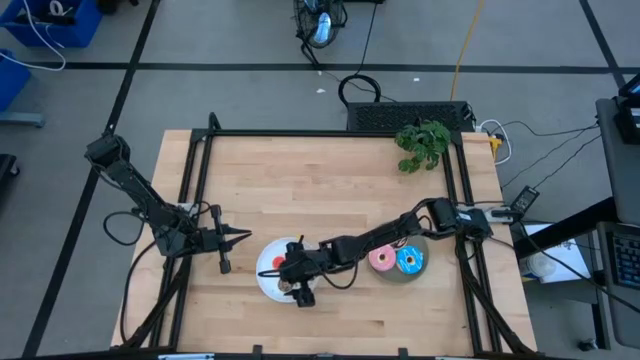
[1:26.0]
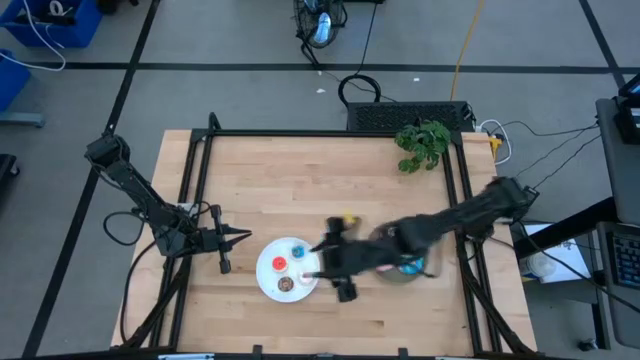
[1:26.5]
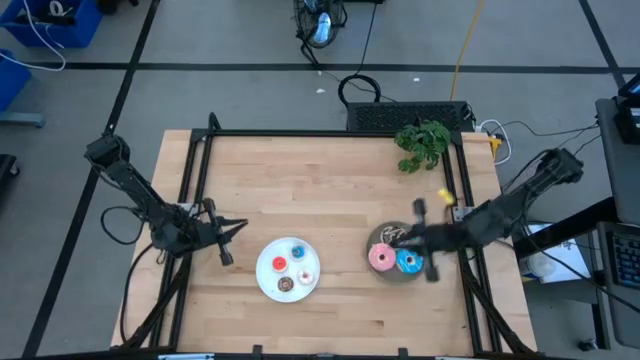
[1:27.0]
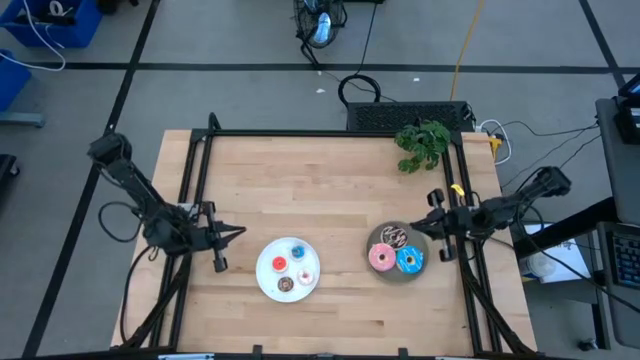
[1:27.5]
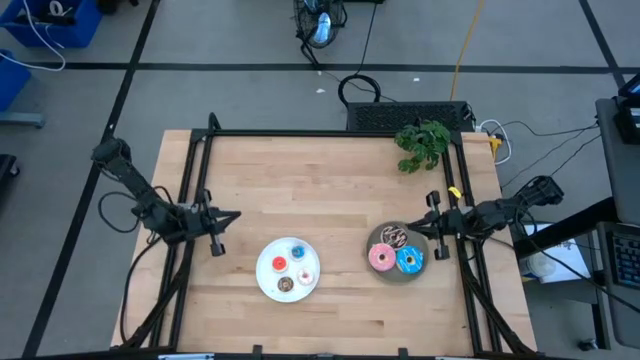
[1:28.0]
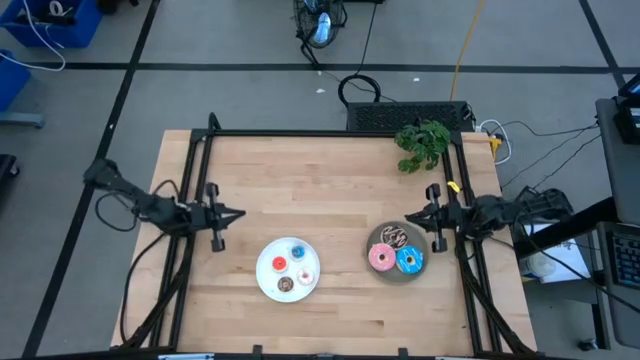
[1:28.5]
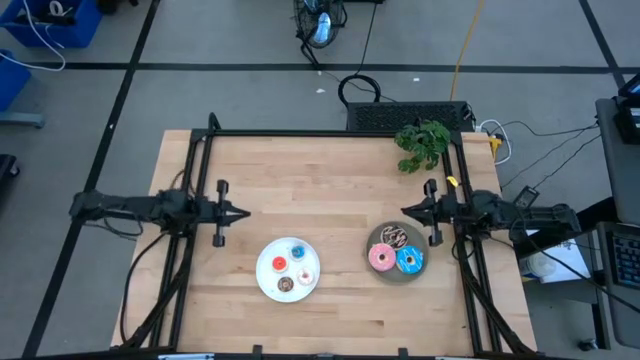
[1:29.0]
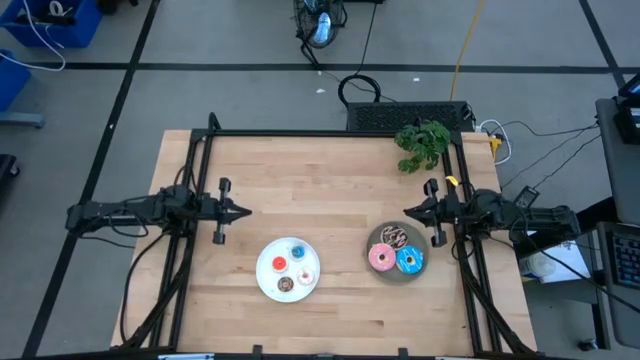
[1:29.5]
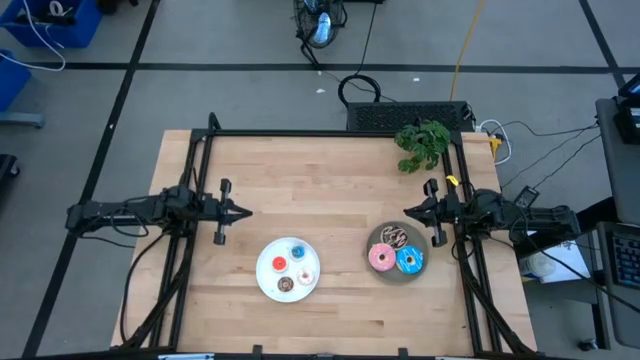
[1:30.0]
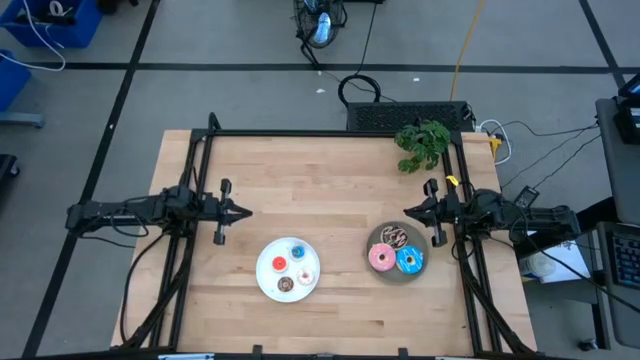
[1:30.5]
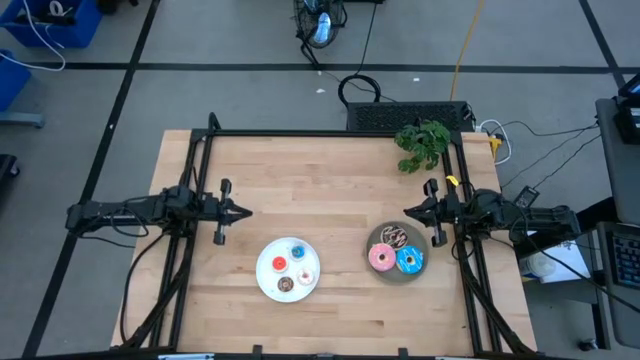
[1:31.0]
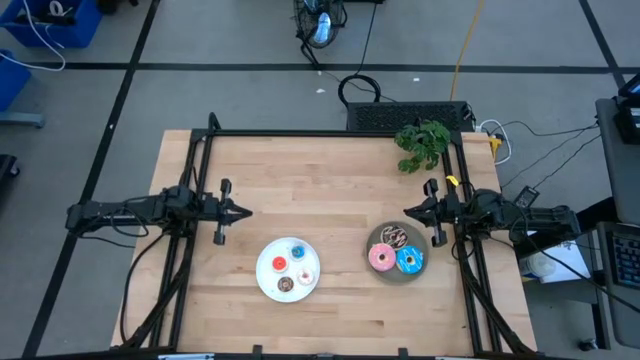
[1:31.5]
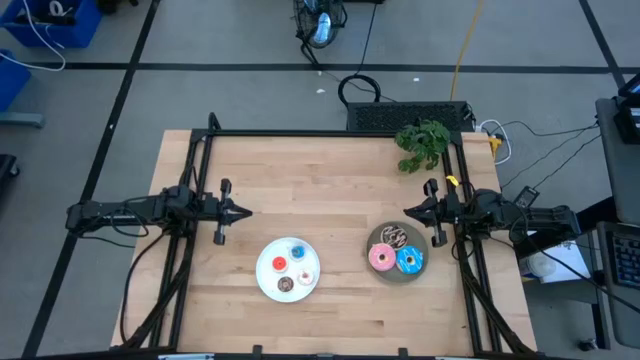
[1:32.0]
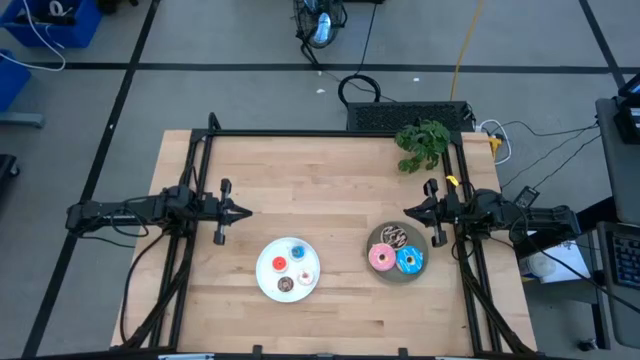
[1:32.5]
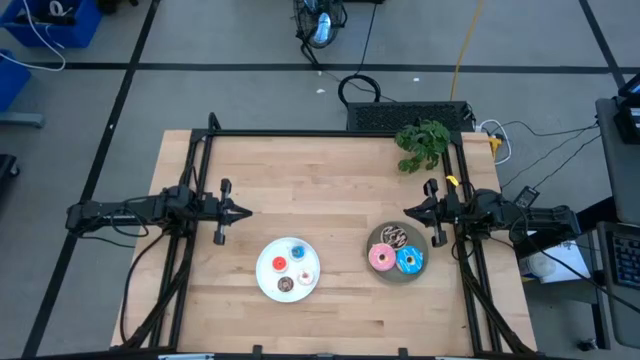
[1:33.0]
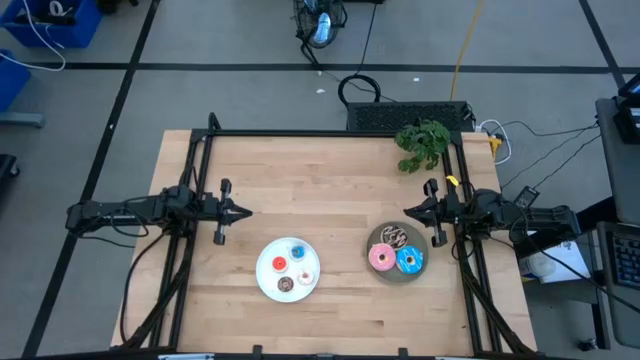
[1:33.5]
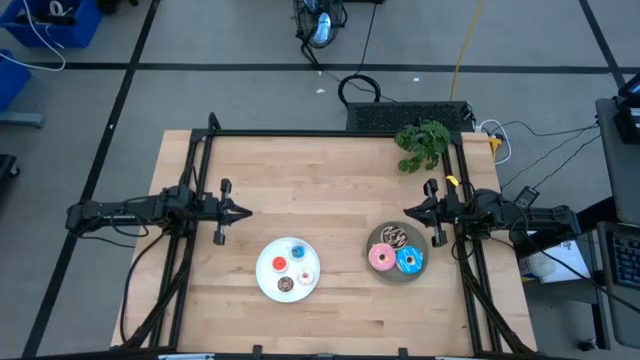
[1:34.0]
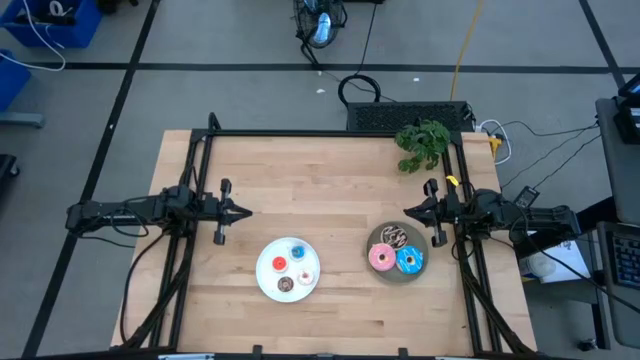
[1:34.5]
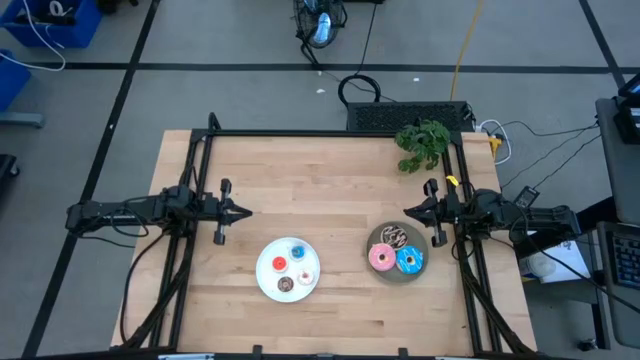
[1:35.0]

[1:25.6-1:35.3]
Task: Pick & Place donuts
Return to Home Position

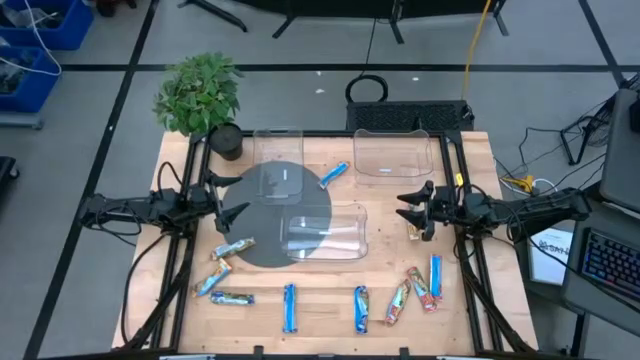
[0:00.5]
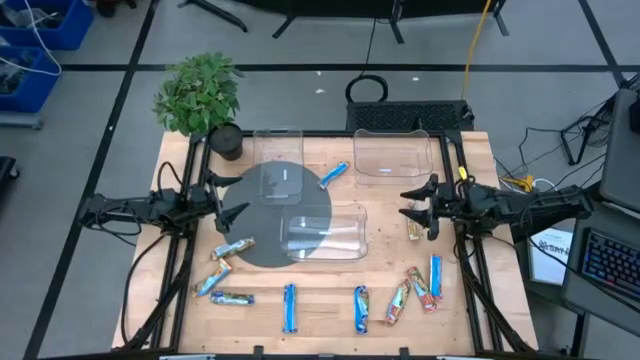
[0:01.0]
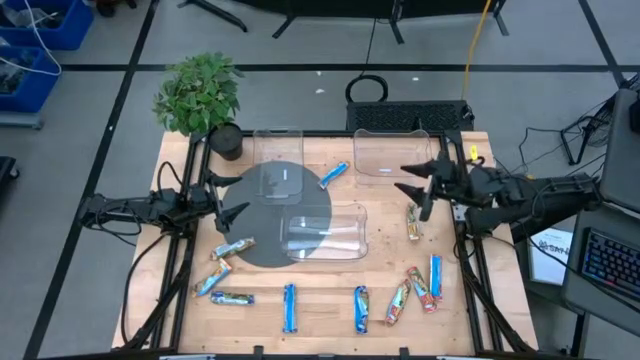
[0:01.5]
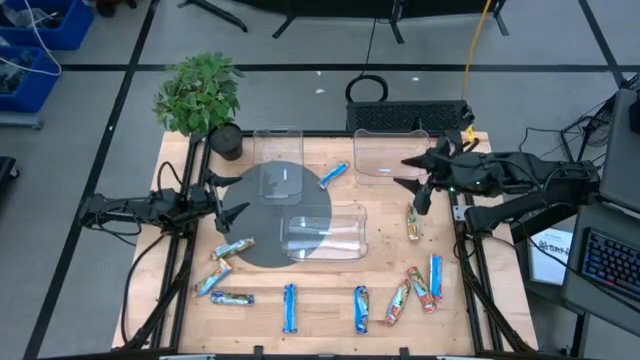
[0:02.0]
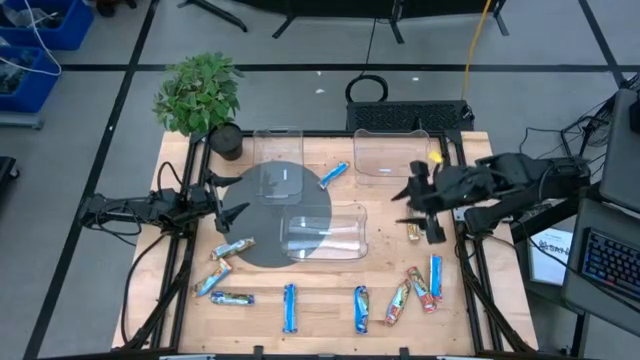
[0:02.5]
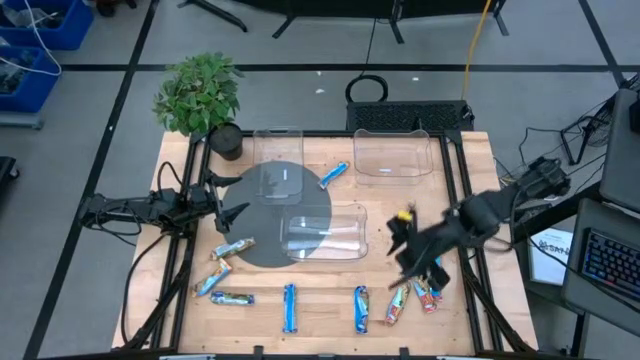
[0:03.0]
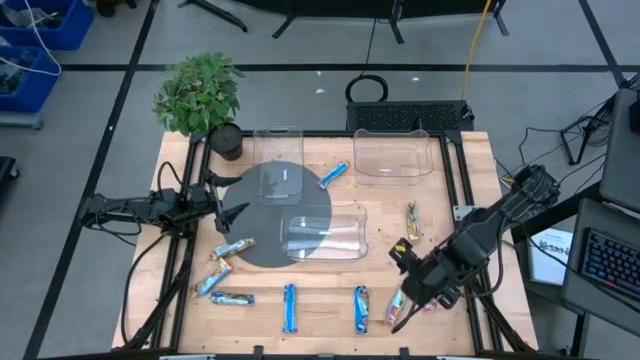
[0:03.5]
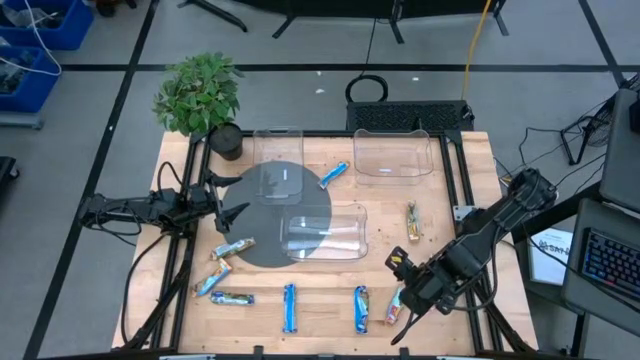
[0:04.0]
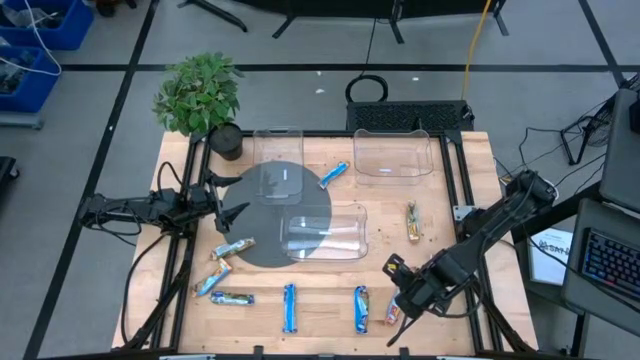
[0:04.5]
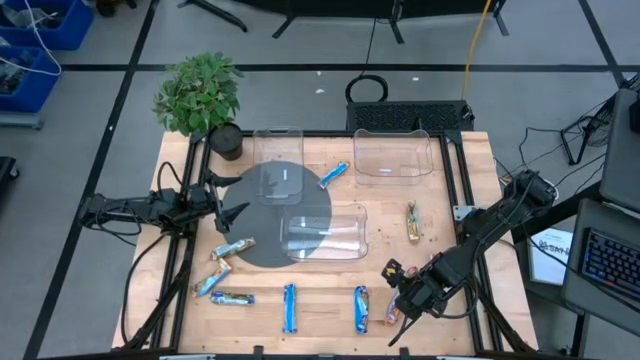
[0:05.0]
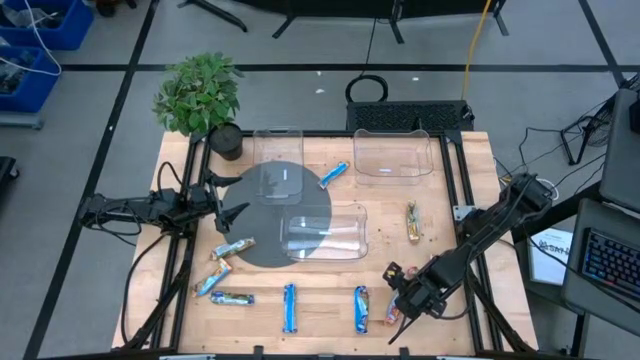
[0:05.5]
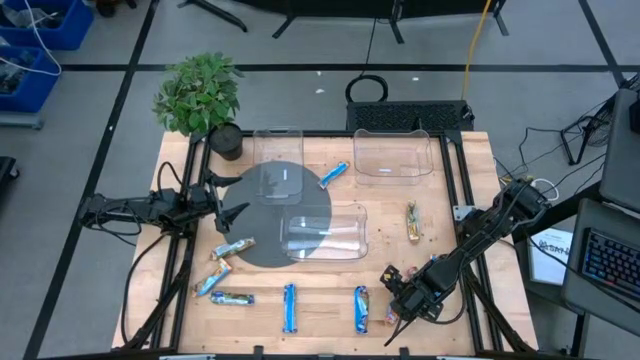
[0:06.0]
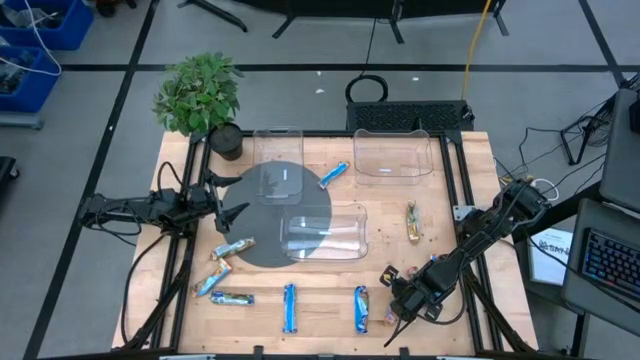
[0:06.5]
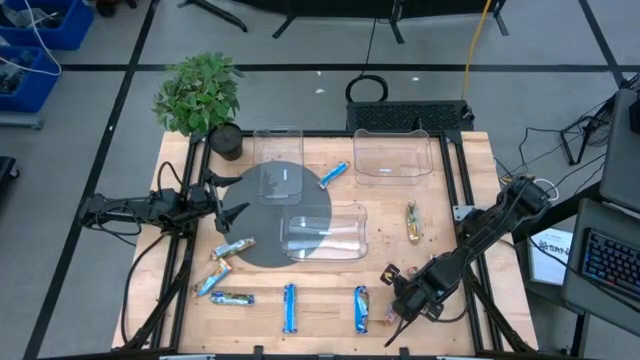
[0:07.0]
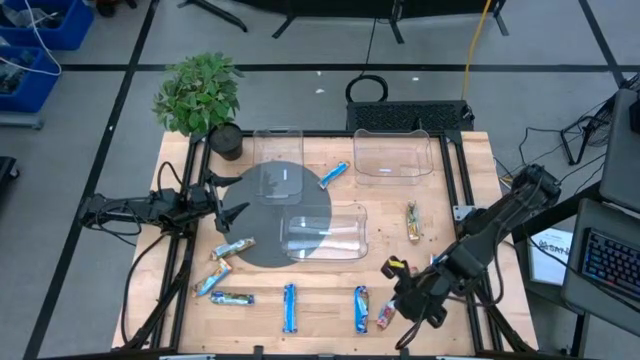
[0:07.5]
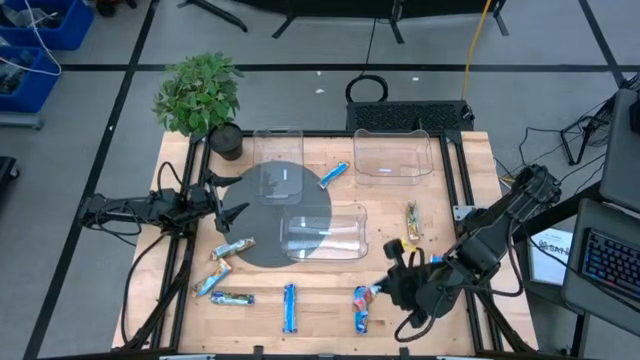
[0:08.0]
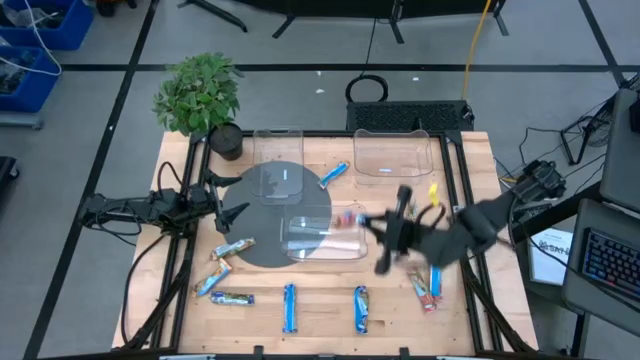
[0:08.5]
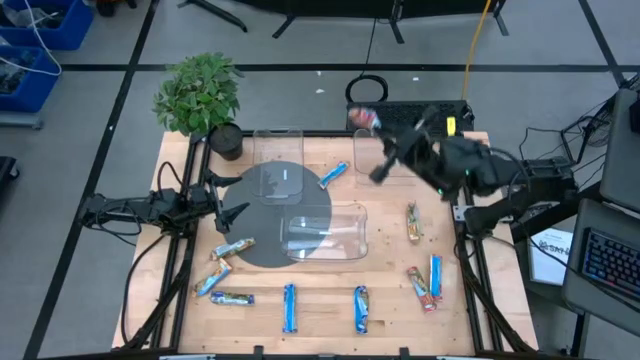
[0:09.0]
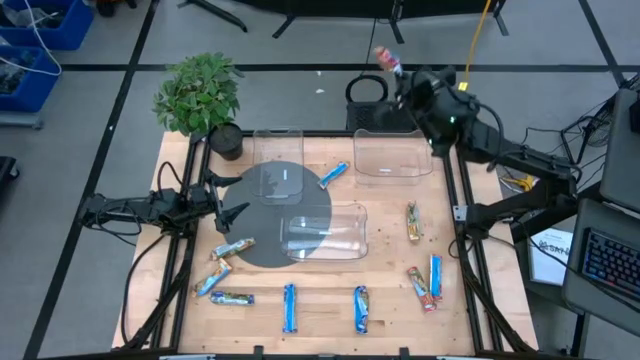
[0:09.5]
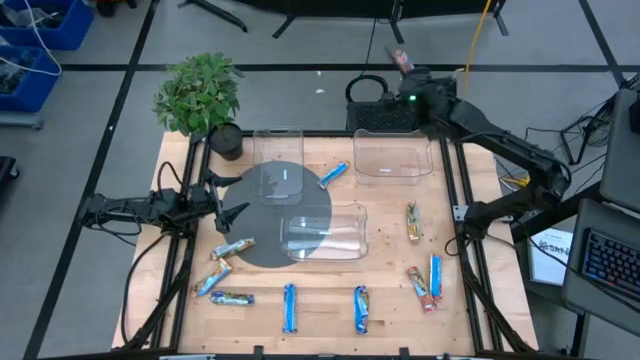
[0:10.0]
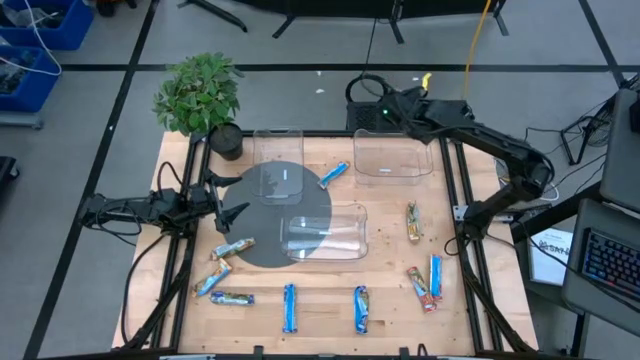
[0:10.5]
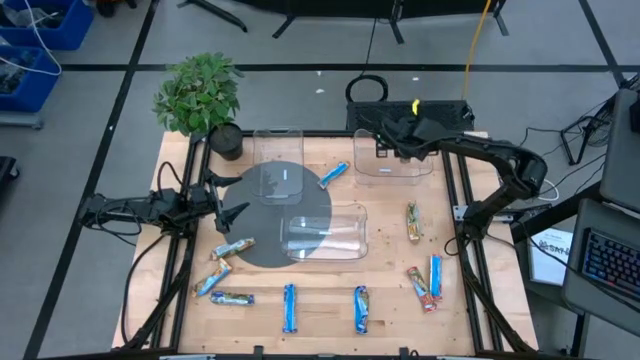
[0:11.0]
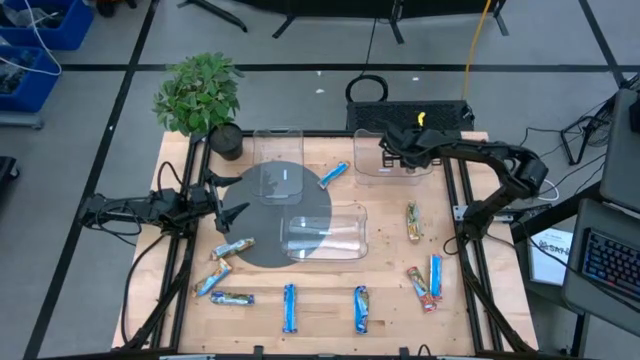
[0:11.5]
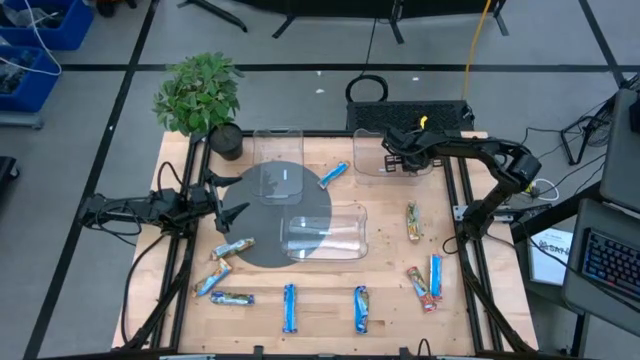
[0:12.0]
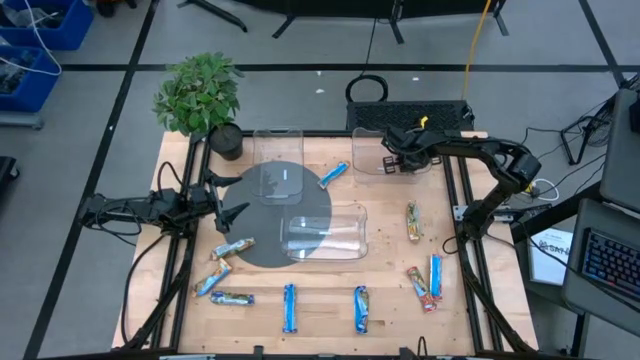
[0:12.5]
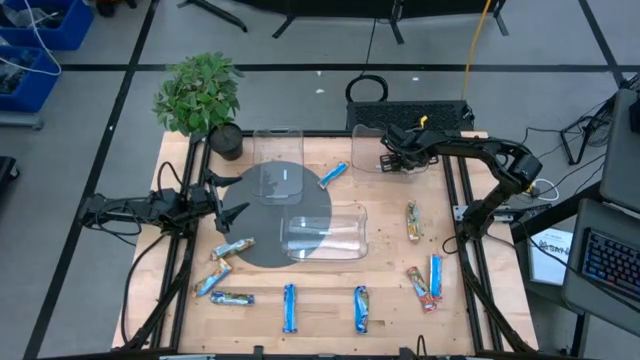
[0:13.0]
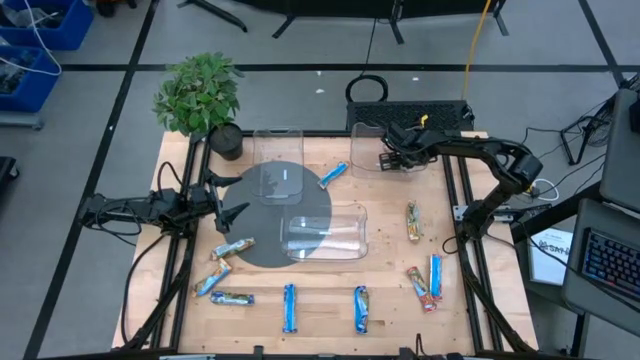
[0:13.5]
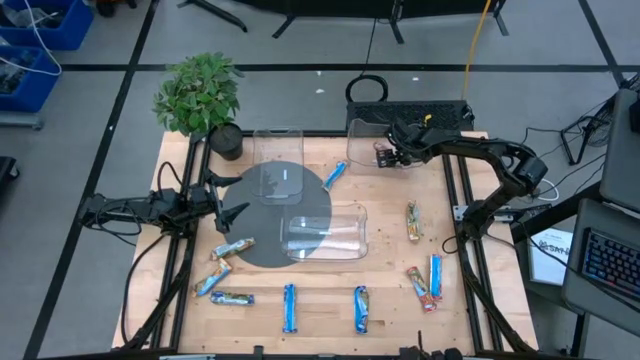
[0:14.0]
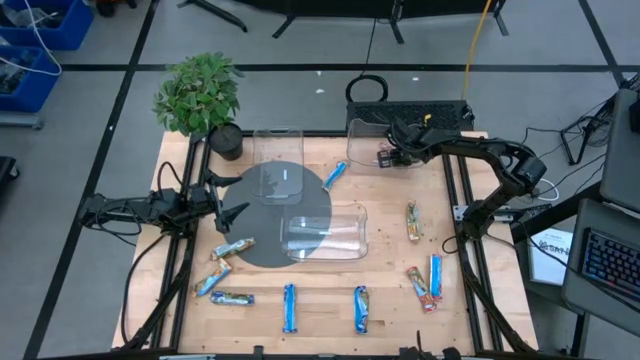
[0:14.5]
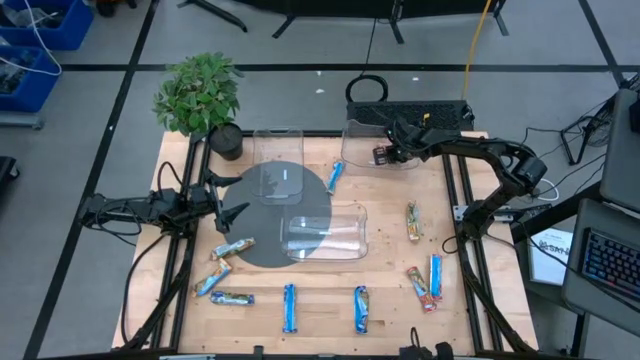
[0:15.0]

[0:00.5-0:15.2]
Task: Pick and place Granola Bars by type
Put the red granola bar into the top right transparent bin
